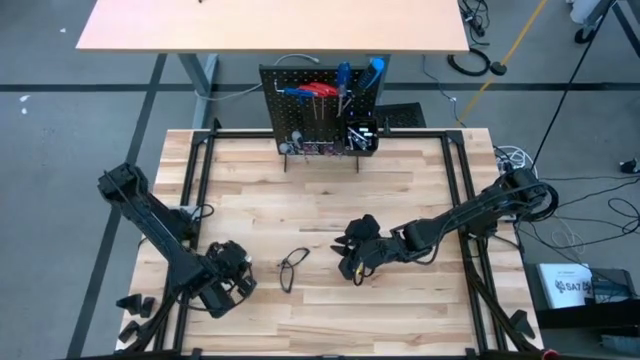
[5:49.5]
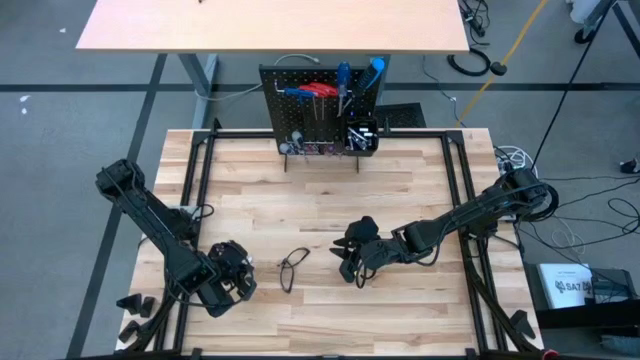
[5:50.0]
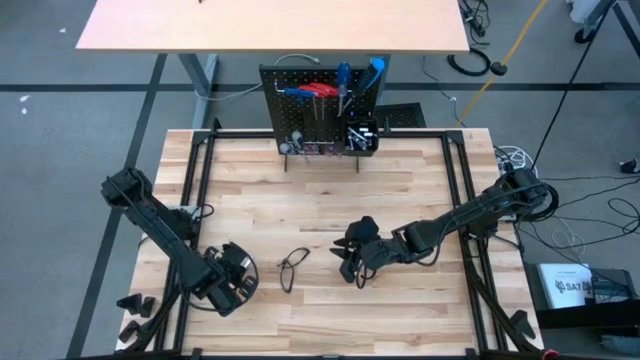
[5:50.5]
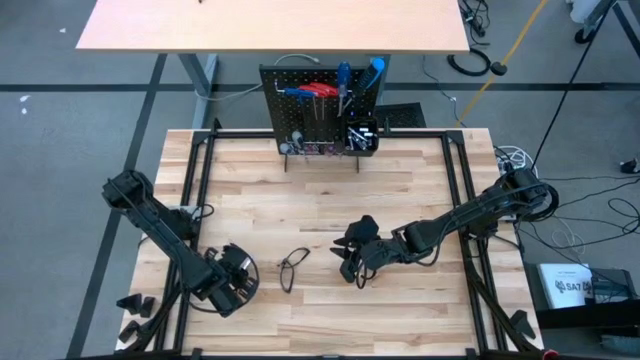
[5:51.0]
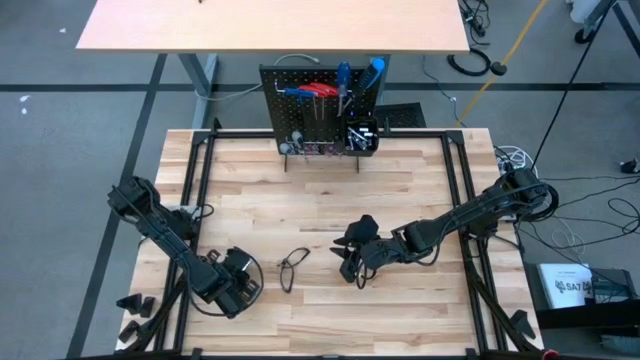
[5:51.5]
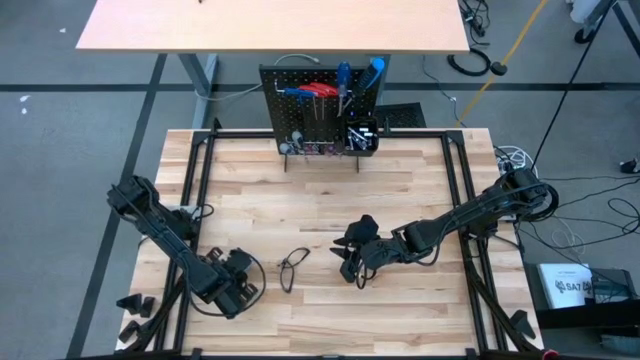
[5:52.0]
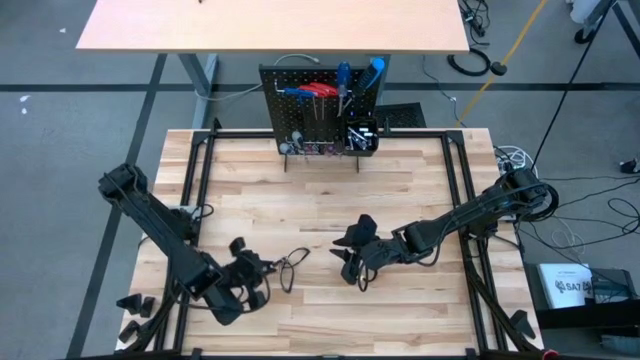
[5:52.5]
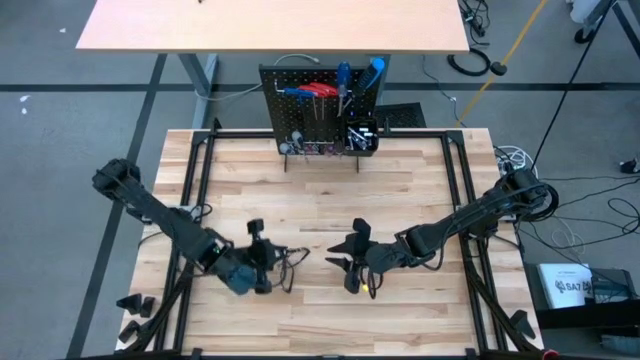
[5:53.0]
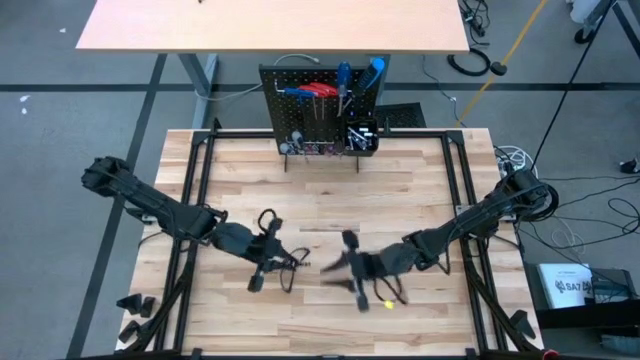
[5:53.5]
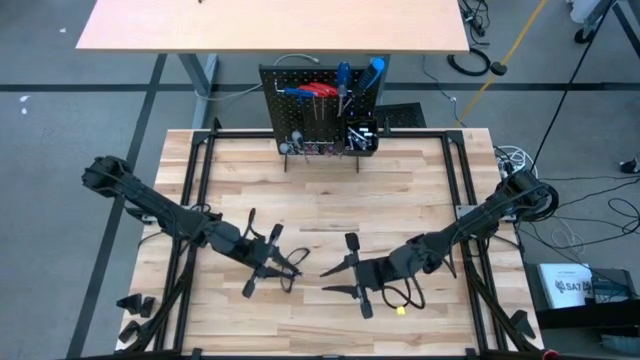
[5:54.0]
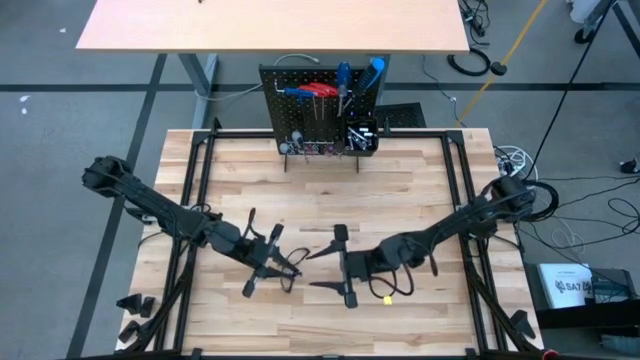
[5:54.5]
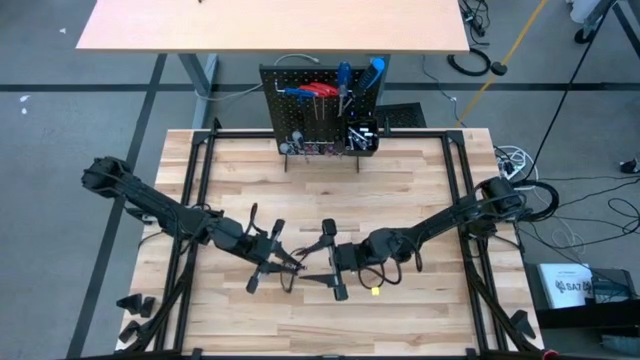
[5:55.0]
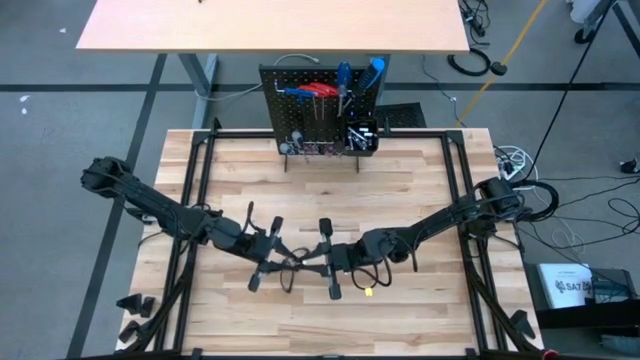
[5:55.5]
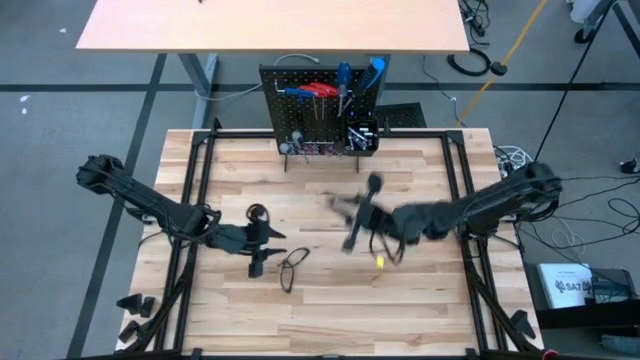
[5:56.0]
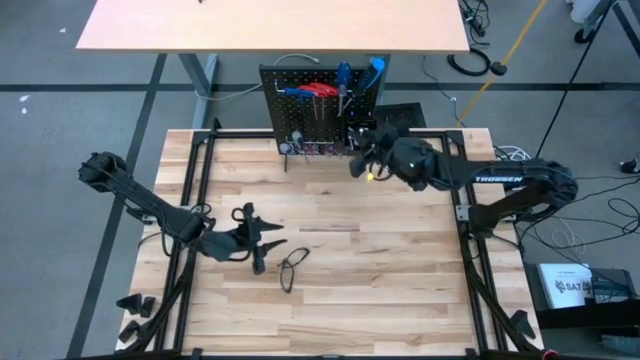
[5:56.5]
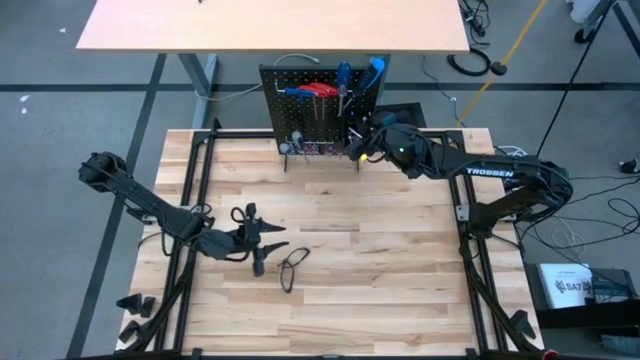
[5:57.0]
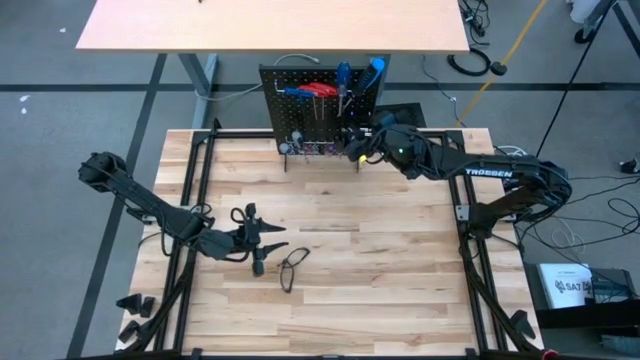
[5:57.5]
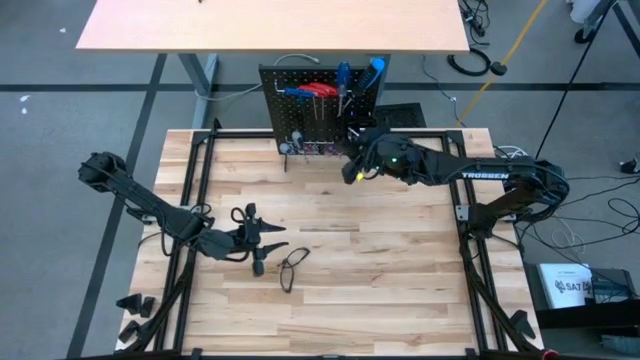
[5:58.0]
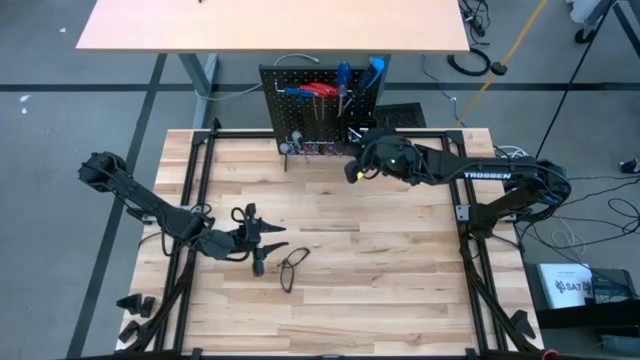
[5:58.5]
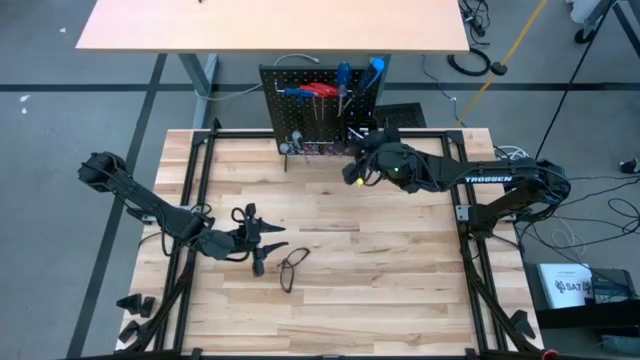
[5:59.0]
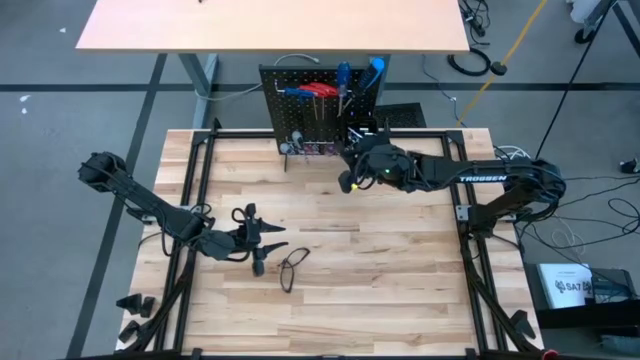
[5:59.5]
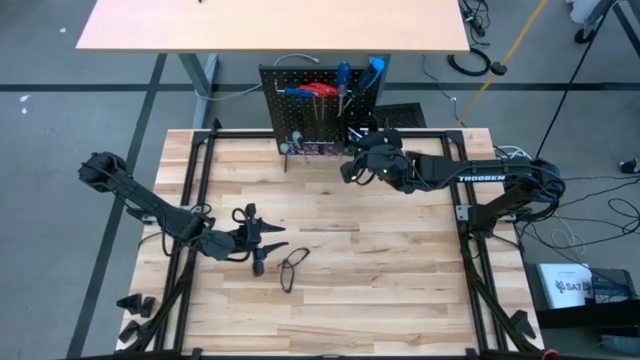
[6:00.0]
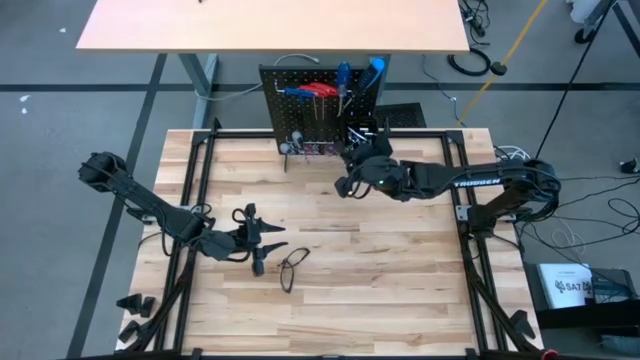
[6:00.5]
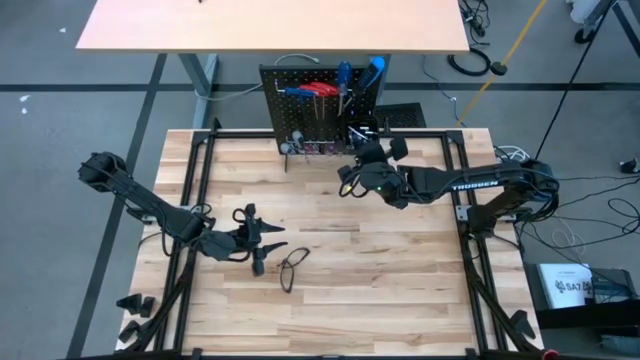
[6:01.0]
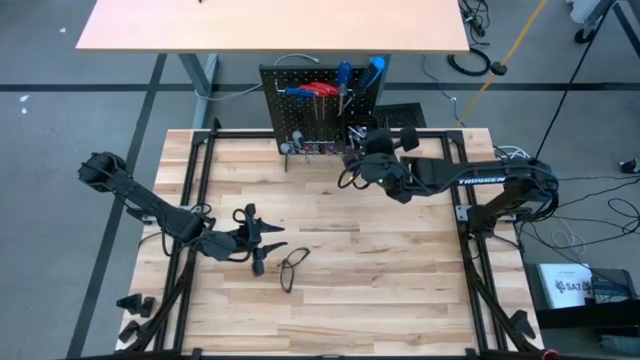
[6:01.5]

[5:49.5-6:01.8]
Task: Hang tools onto peg board
Put the extension bar into the black bin on the peg board

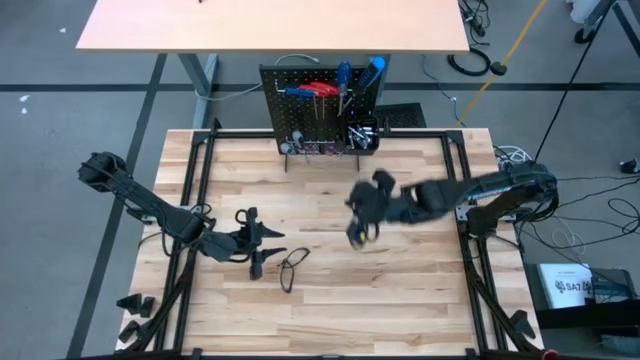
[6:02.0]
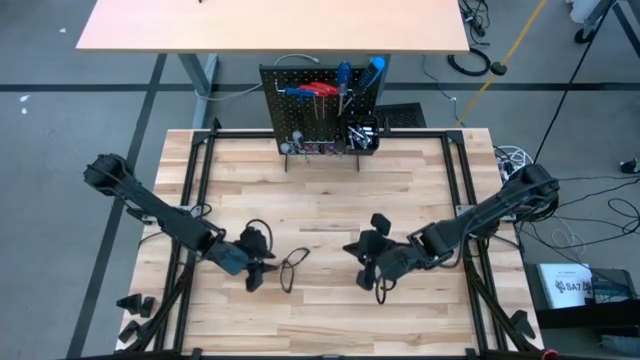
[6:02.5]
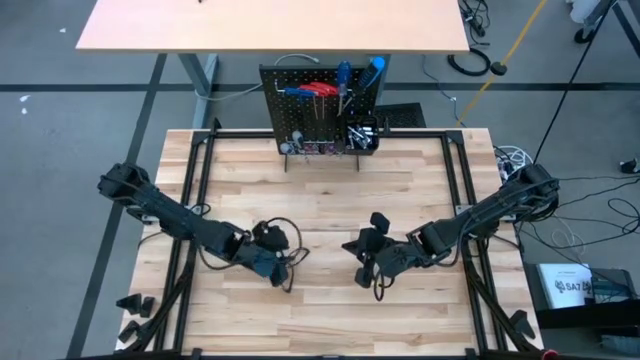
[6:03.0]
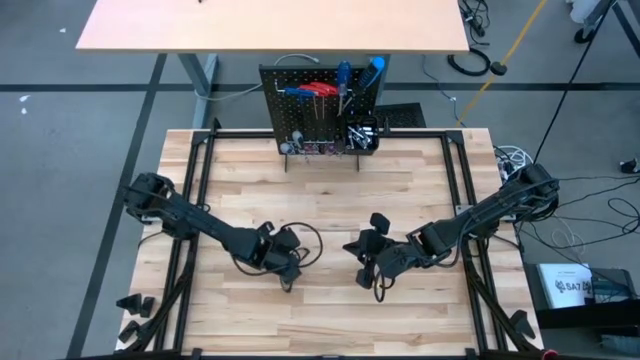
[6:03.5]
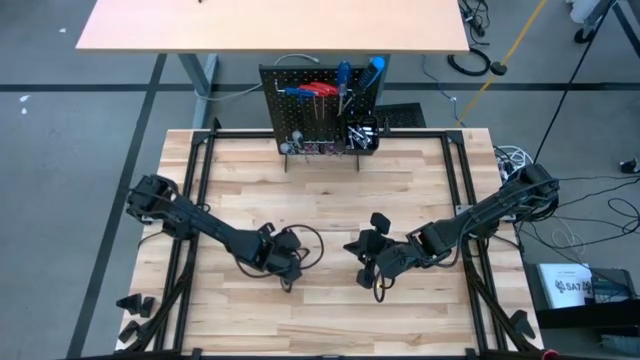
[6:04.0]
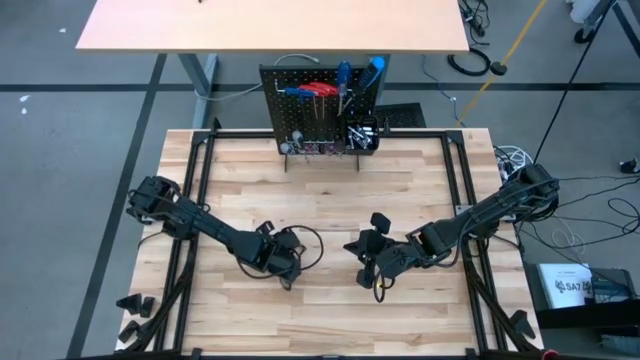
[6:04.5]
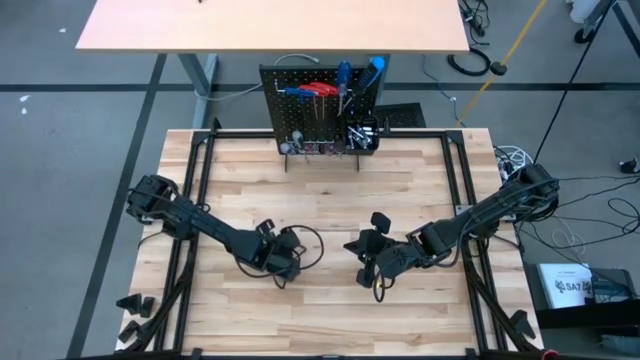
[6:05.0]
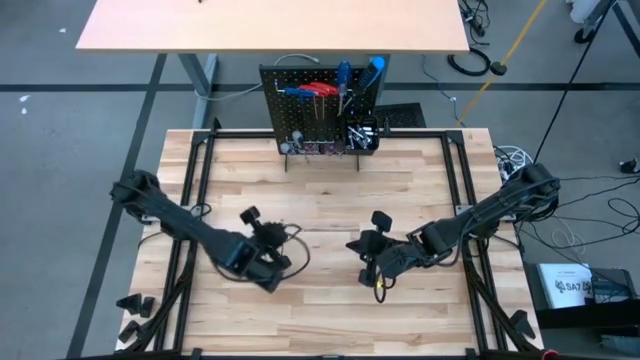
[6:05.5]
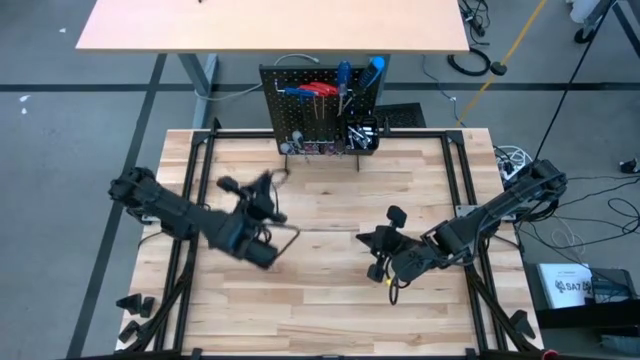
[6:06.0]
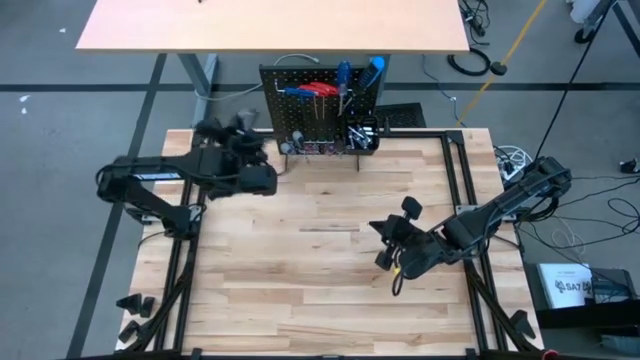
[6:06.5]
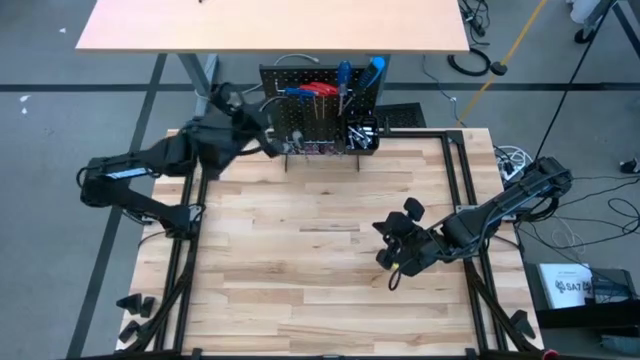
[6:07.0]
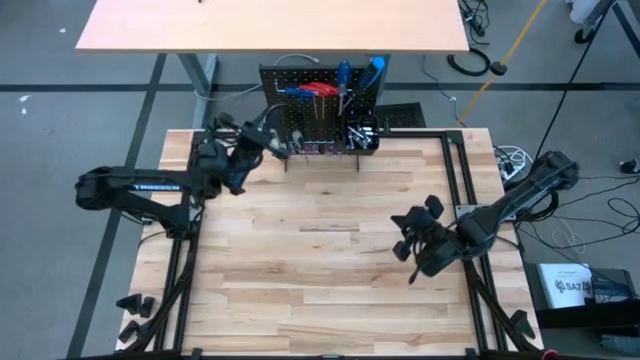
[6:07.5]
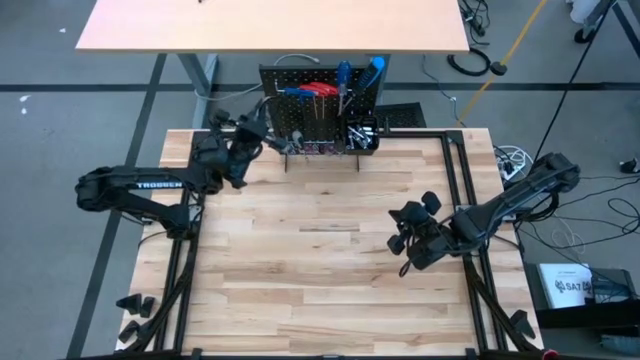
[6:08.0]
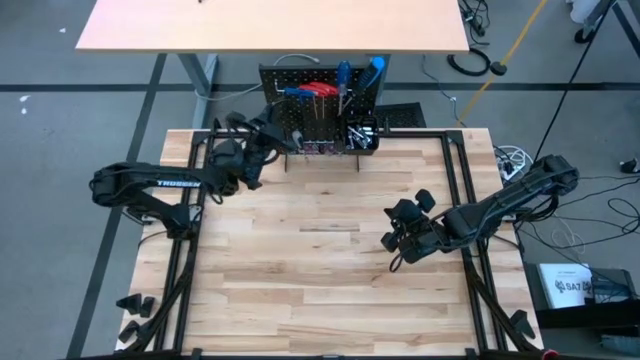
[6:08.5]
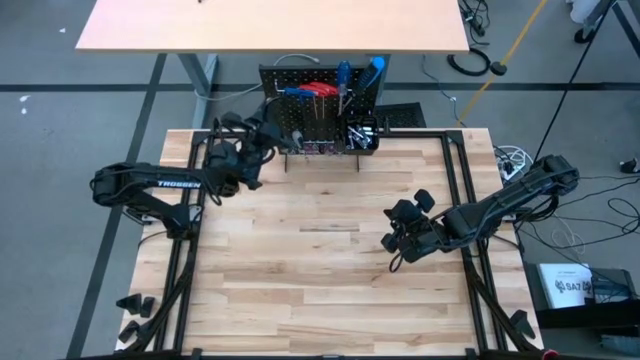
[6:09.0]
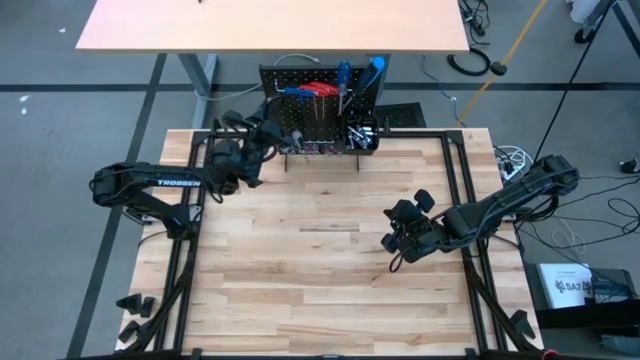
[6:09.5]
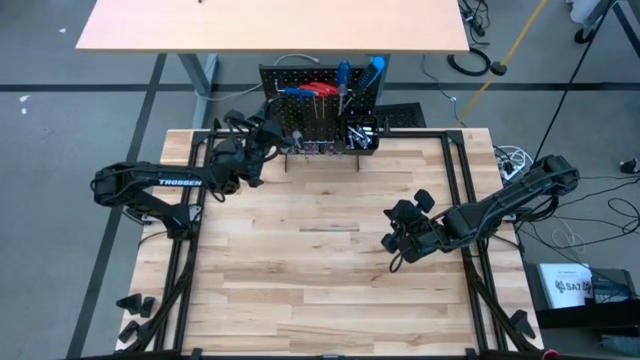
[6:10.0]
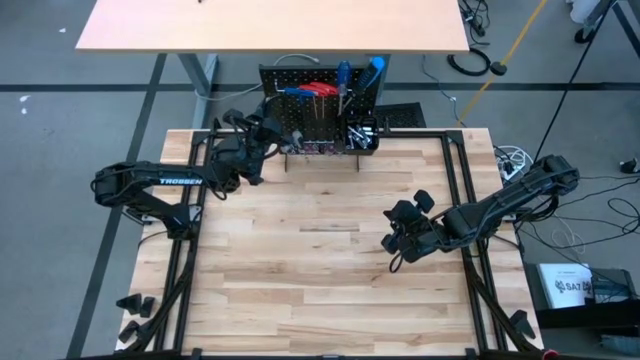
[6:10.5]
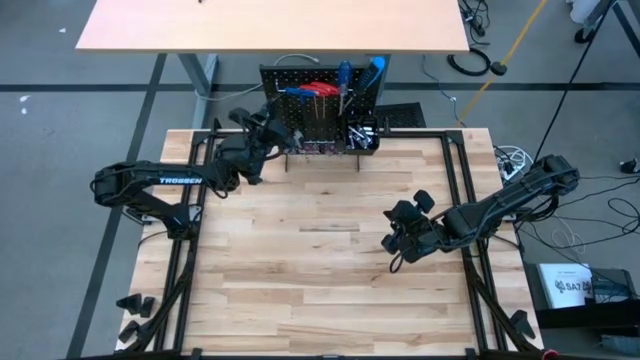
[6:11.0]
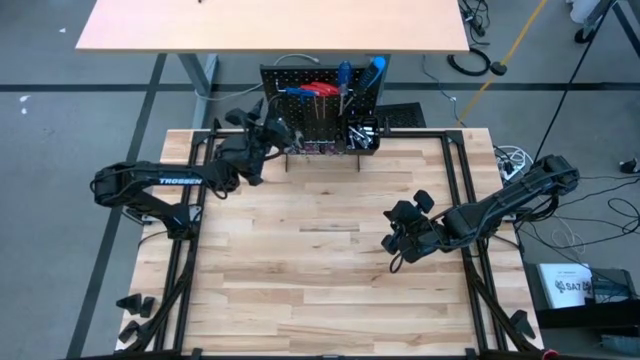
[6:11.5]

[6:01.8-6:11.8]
Hang the glasses on the pegboard
